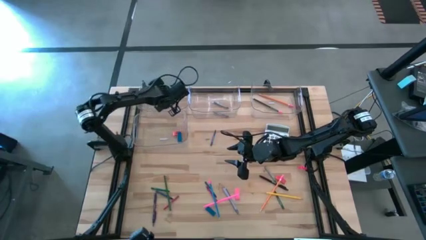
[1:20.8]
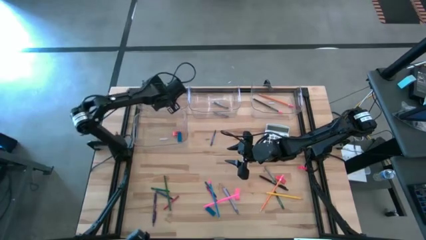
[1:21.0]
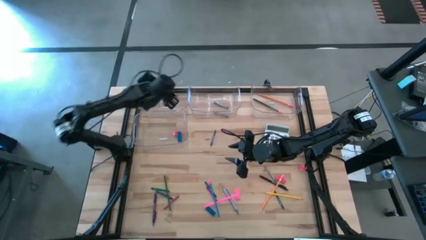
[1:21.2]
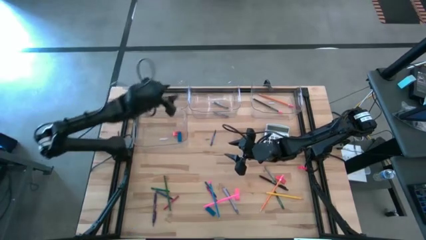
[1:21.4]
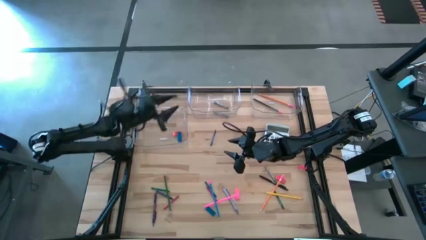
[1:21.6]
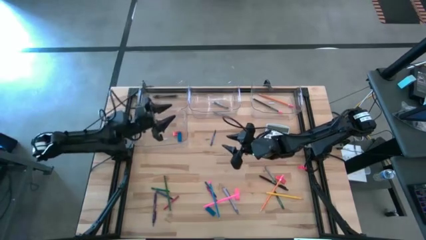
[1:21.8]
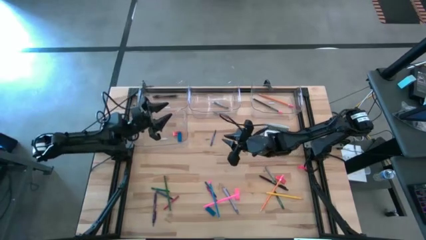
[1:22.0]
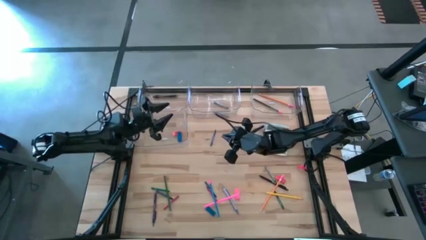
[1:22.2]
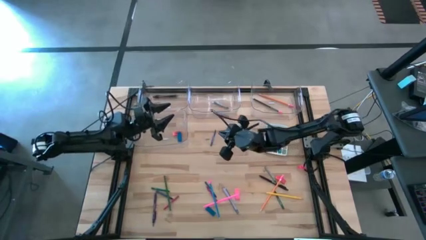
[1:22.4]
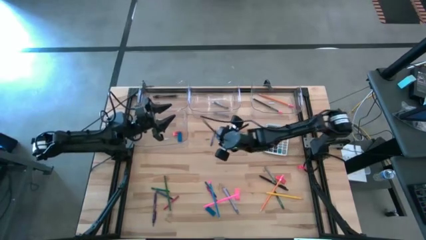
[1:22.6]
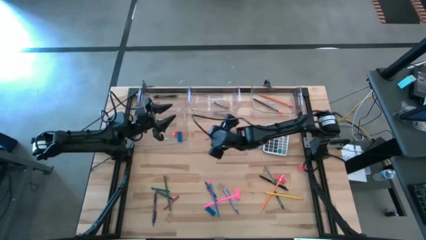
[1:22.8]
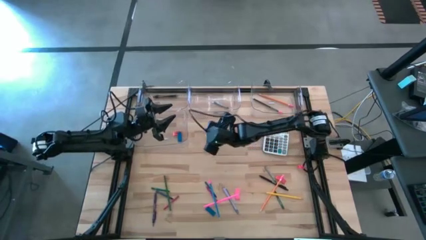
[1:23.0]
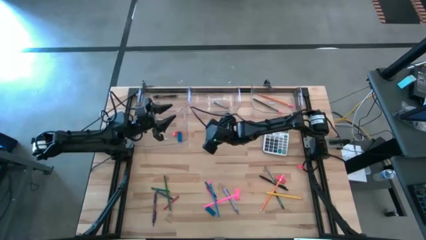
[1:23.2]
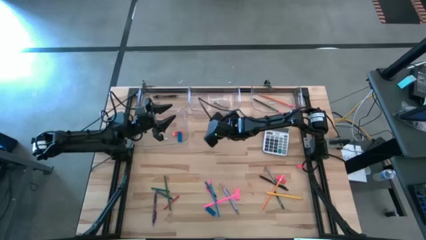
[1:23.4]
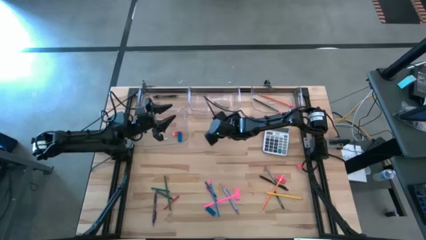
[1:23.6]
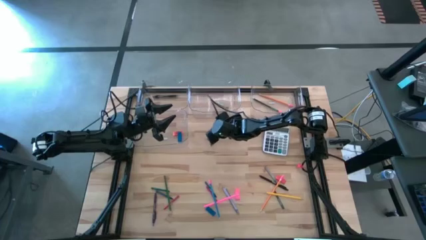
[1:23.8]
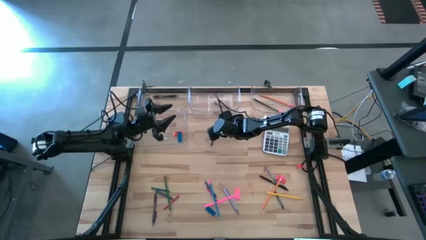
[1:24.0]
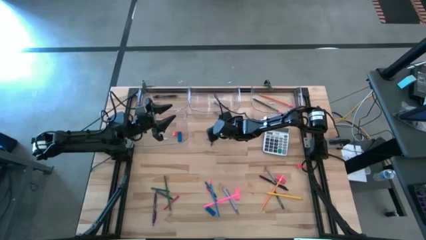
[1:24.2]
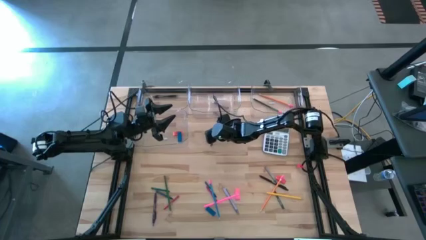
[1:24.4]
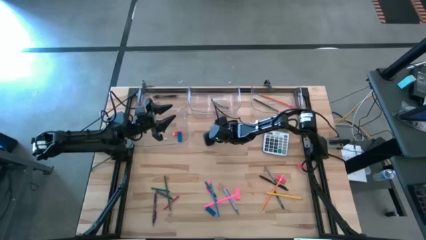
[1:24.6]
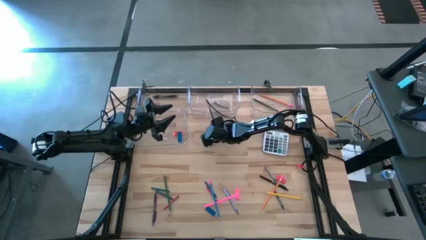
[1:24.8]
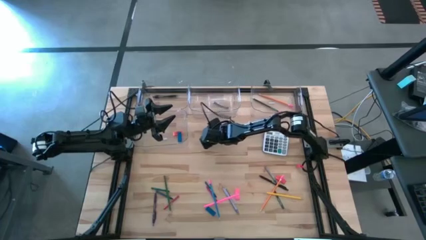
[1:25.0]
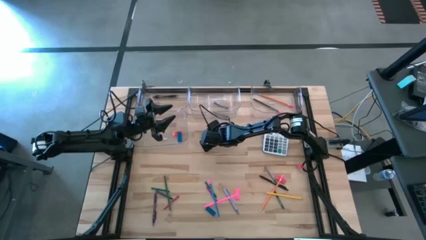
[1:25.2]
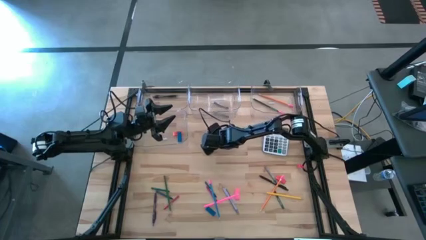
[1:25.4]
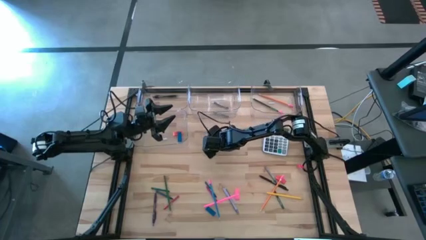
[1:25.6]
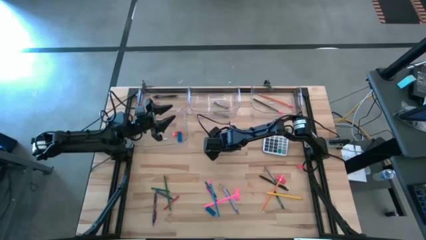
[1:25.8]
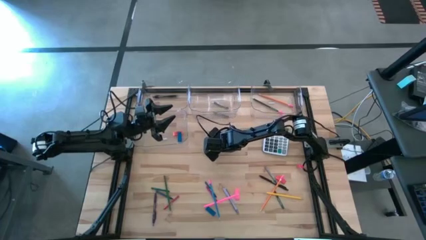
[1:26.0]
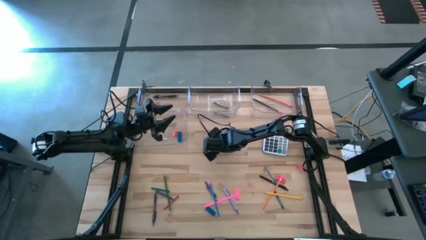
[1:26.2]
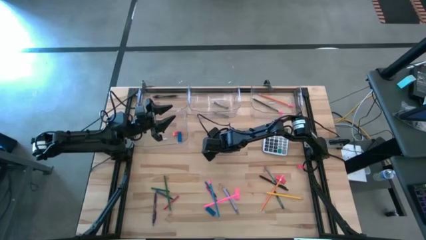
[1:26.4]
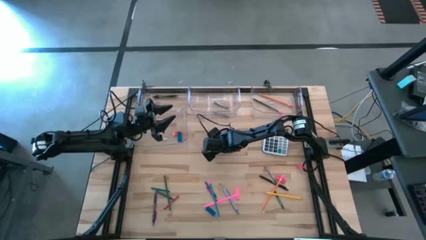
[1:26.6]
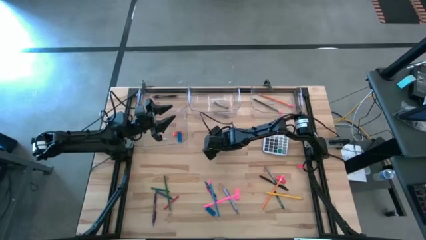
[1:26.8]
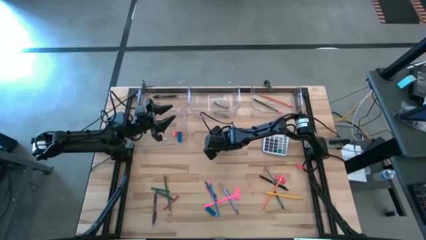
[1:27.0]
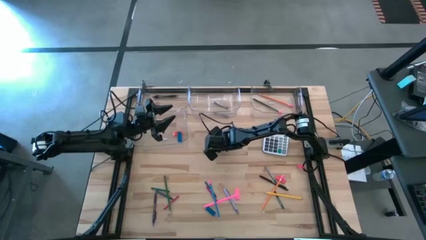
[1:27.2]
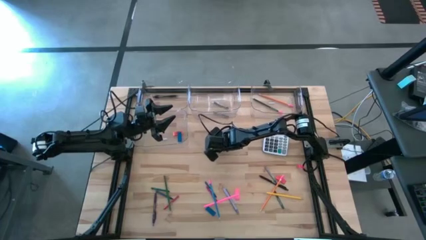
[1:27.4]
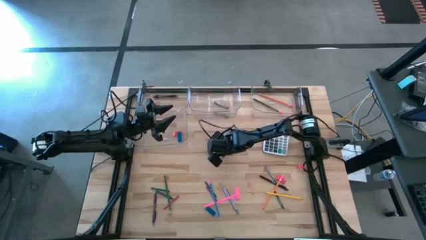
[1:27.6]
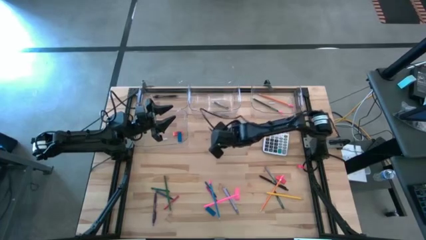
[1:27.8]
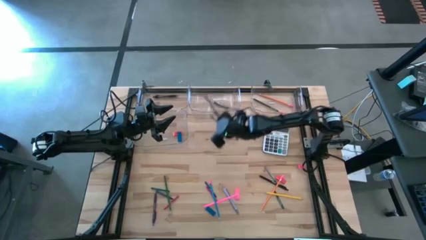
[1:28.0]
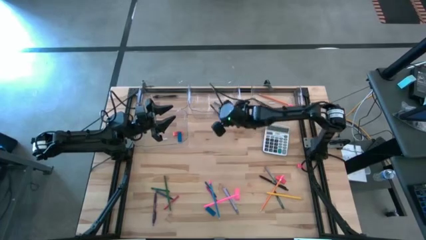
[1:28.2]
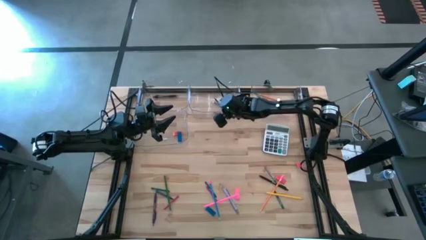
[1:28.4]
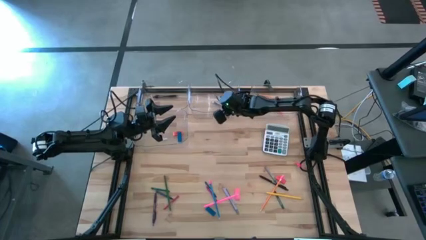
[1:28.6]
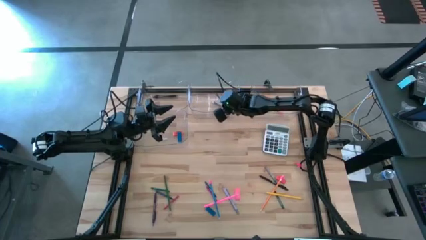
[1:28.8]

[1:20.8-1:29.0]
Task: Sort crayons/erasers/pens/pencils in bins
Put the blue crayon into the top center transparent bin

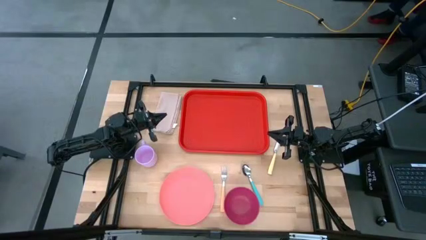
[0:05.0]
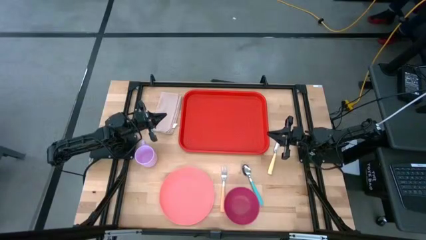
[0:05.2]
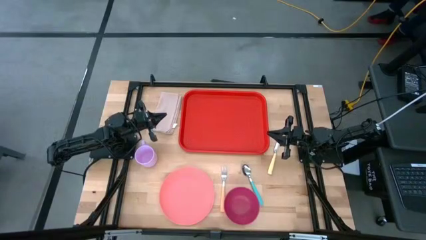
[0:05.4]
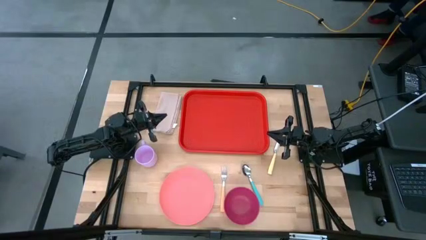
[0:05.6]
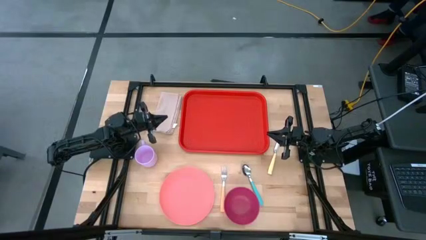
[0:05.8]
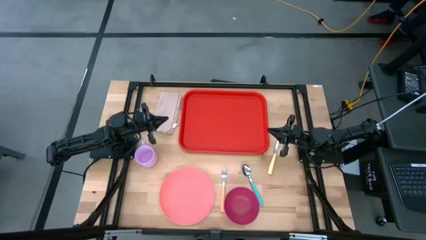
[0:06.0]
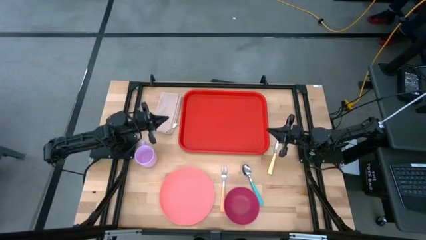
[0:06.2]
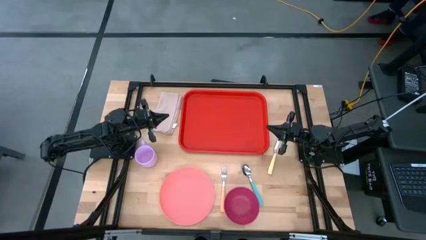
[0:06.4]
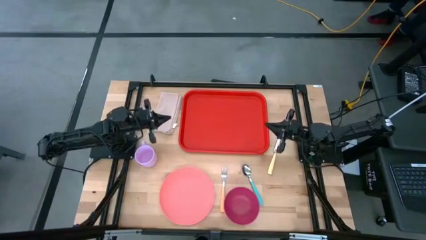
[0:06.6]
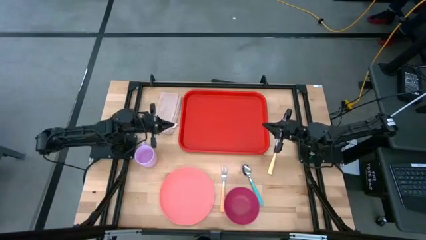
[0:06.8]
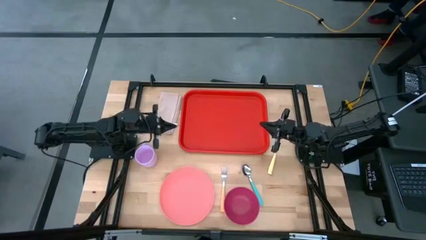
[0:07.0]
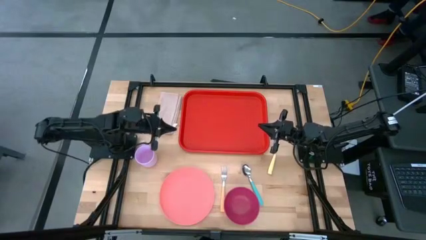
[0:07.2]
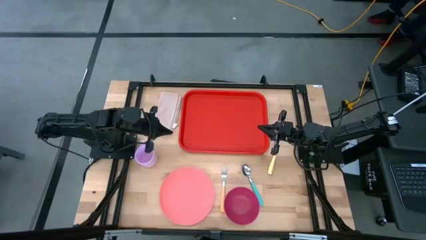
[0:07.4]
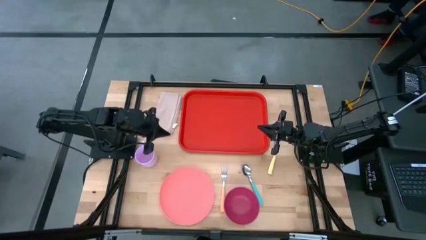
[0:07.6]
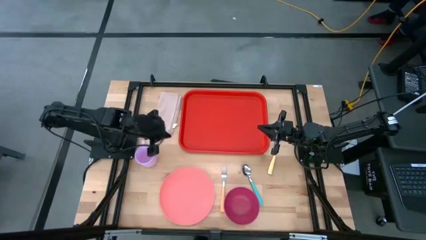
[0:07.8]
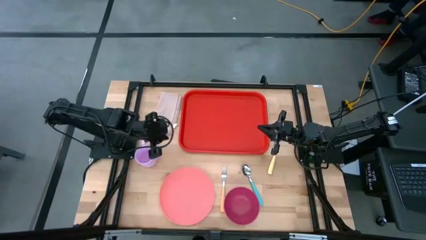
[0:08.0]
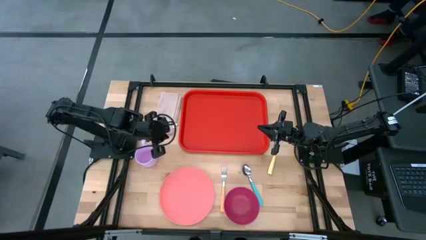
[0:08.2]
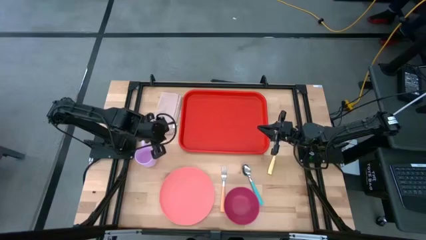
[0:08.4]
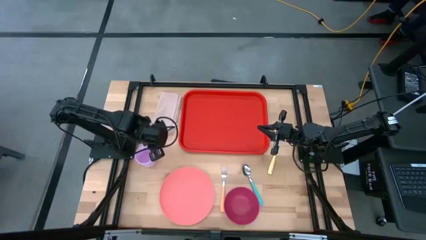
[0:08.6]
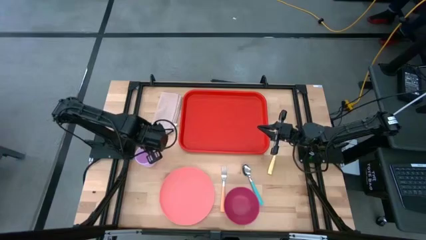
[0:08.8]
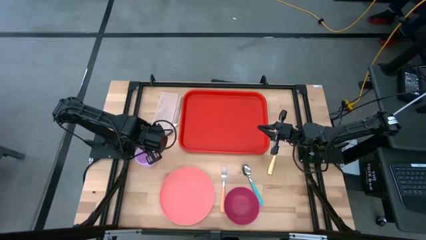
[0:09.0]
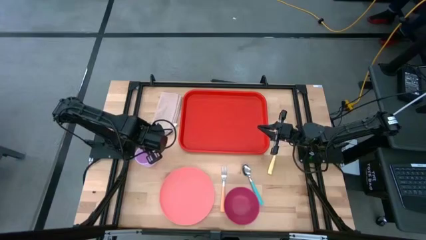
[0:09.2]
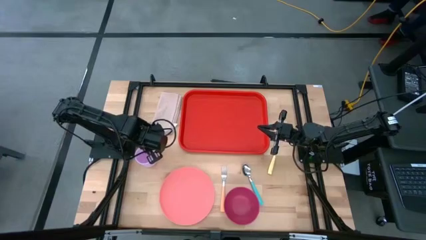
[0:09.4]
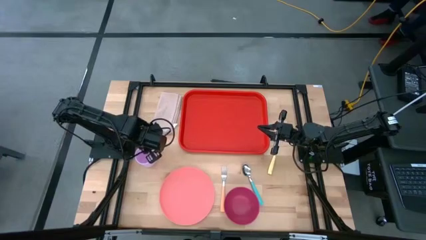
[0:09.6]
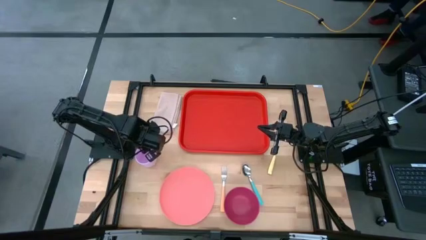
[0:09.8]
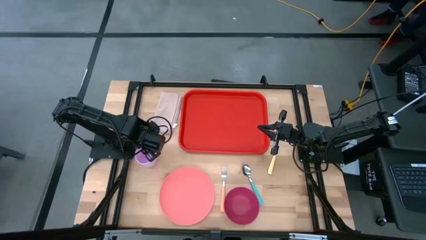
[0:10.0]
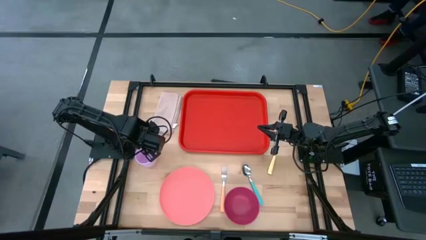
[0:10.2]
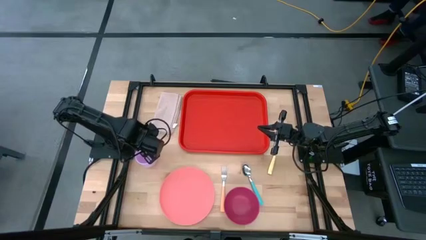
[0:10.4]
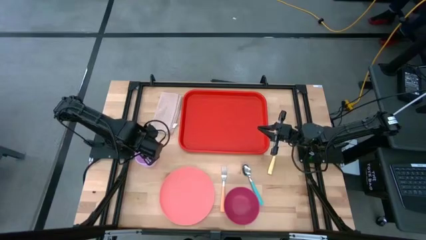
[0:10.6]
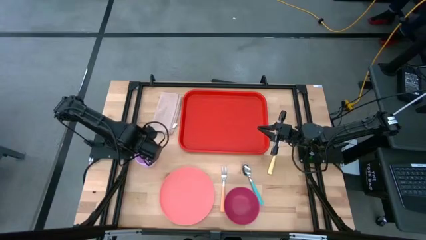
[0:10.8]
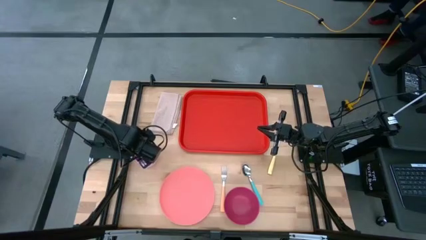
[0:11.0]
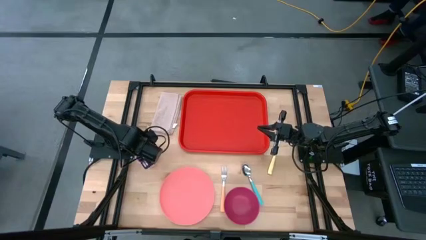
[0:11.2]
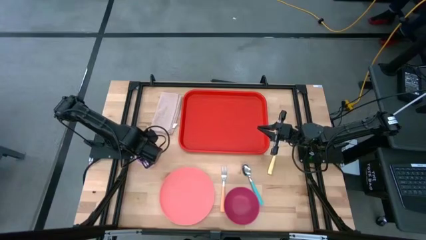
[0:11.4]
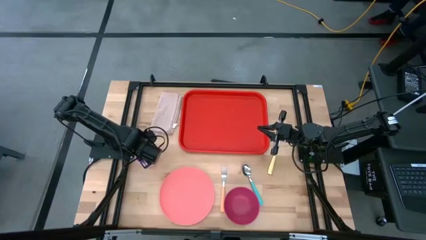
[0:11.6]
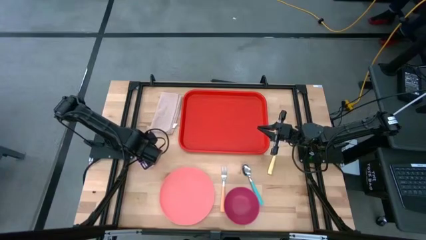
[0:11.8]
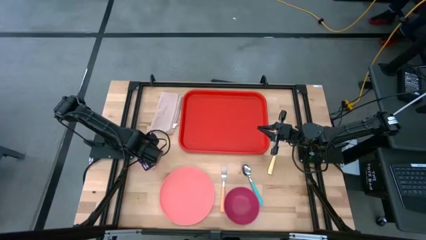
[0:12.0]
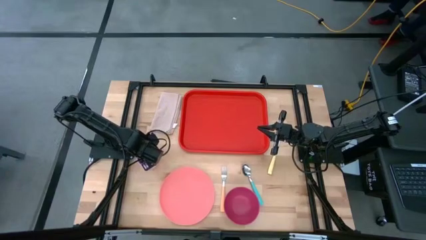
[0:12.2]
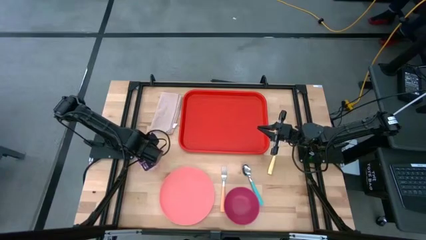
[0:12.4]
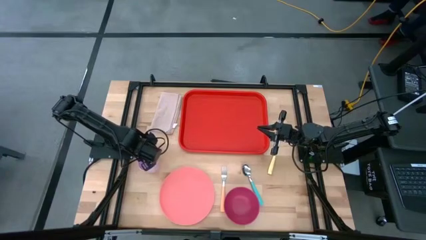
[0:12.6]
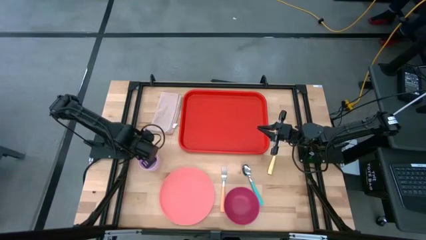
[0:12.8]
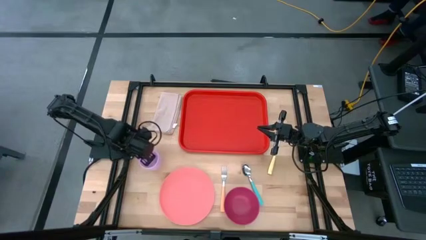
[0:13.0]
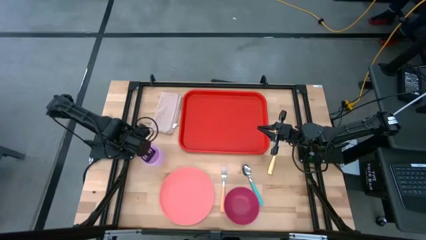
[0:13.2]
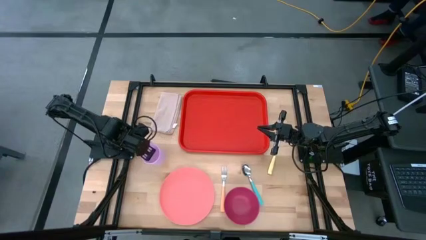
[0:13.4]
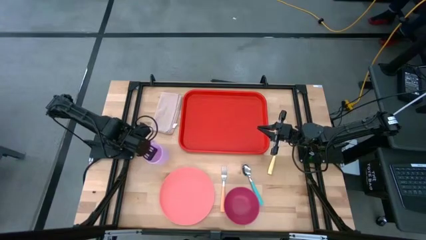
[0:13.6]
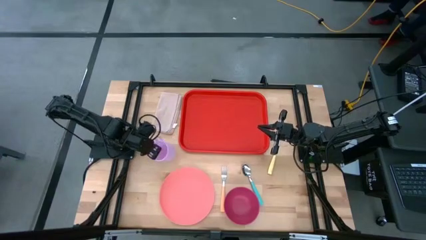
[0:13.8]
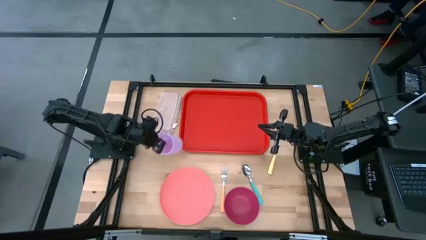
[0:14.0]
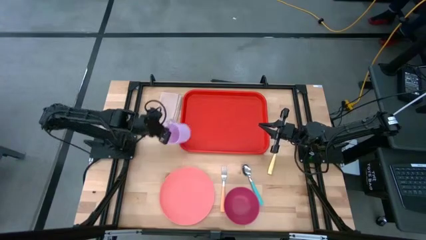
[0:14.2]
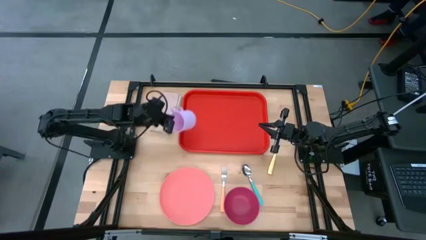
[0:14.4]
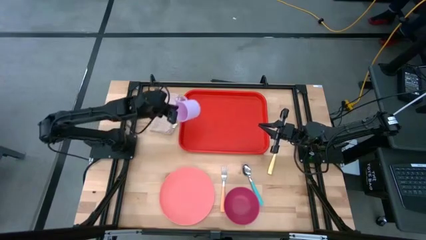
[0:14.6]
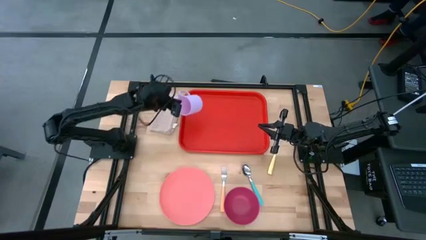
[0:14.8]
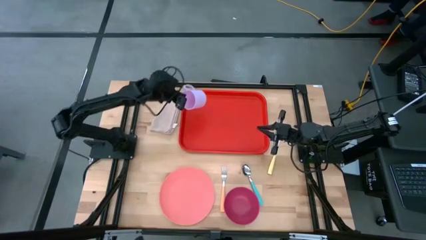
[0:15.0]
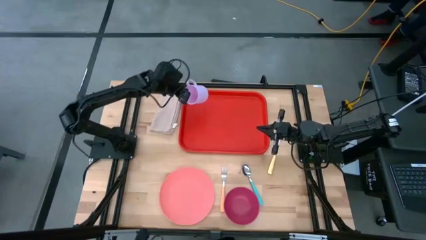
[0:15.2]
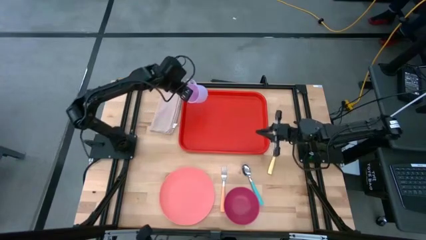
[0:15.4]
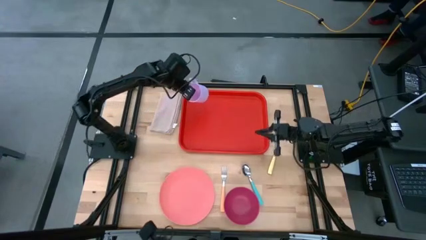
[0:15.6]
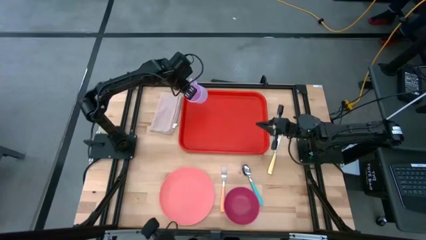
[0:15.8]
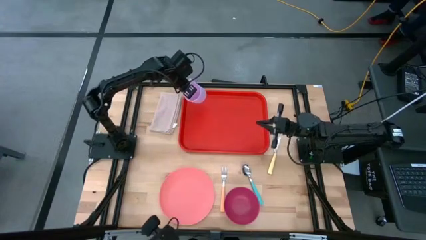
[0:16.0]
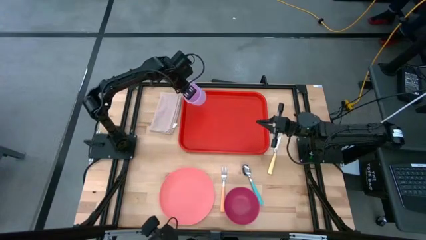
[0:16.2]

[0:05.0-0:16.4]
Task: Set up tray
Put the purple mug on the red tray
